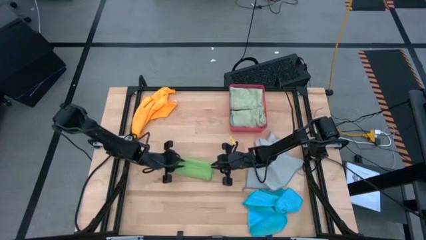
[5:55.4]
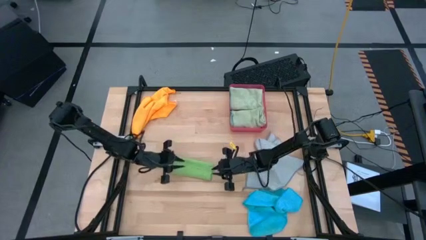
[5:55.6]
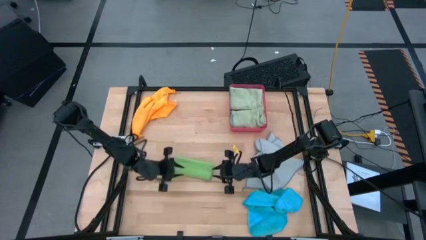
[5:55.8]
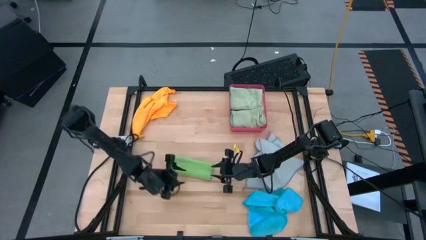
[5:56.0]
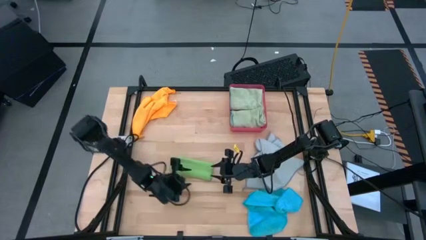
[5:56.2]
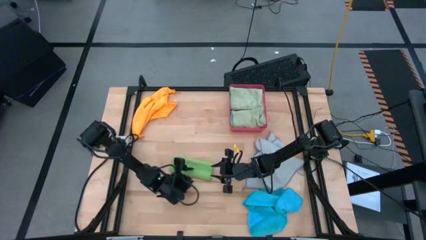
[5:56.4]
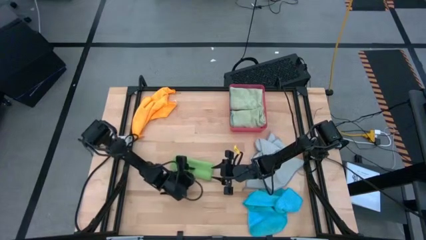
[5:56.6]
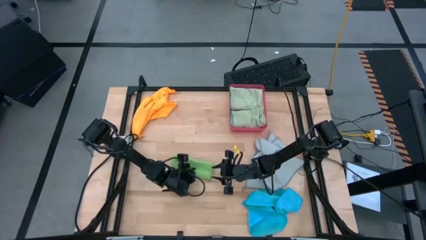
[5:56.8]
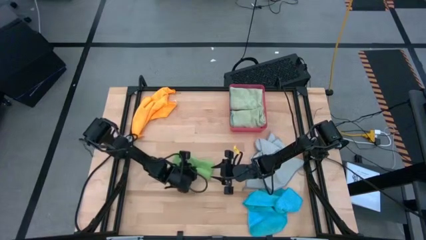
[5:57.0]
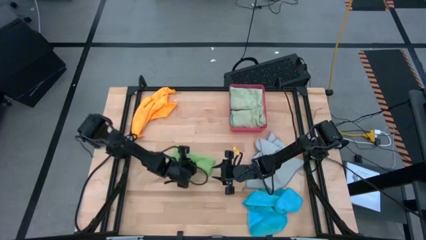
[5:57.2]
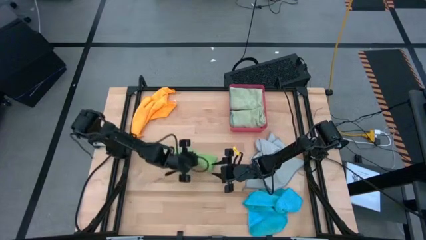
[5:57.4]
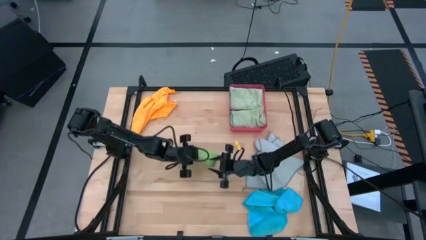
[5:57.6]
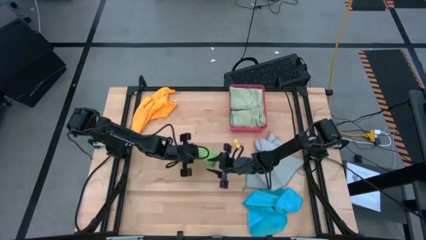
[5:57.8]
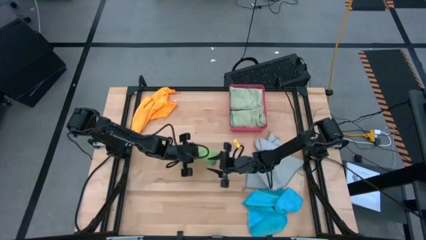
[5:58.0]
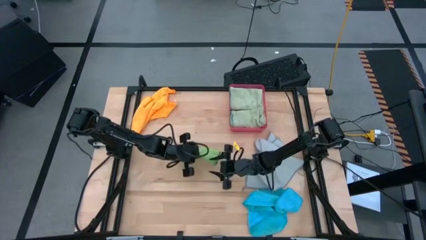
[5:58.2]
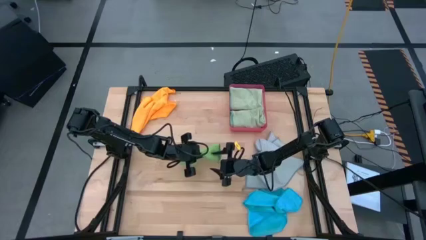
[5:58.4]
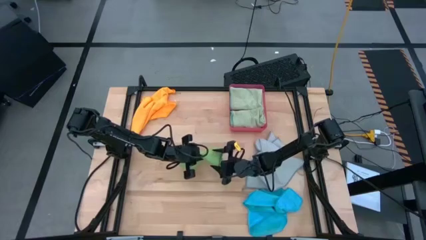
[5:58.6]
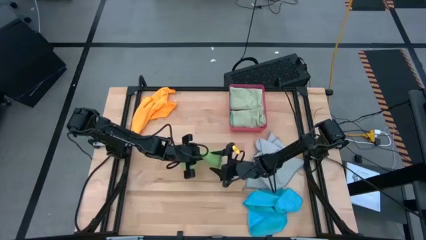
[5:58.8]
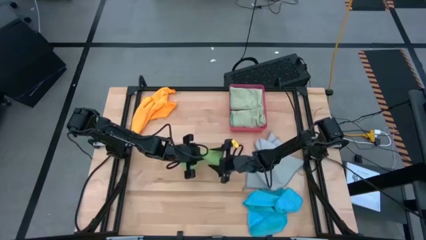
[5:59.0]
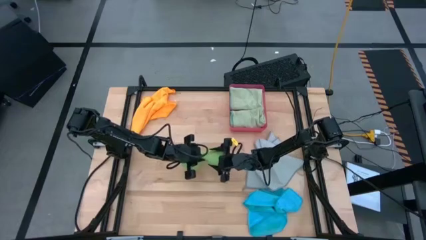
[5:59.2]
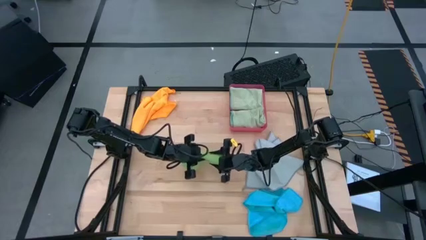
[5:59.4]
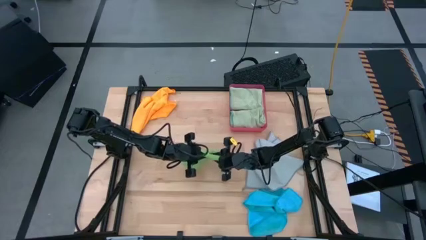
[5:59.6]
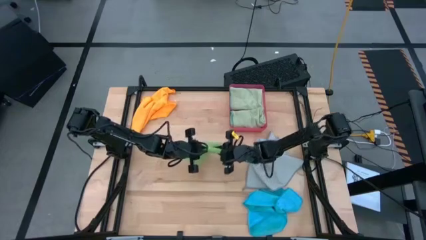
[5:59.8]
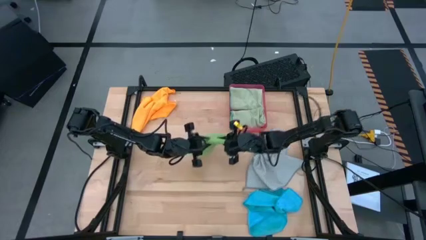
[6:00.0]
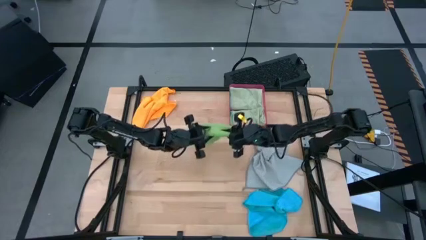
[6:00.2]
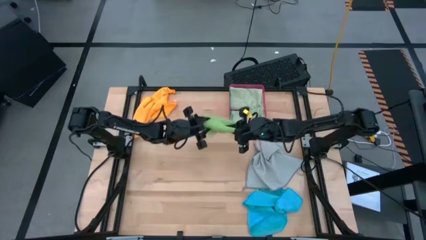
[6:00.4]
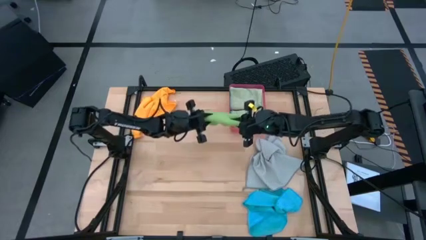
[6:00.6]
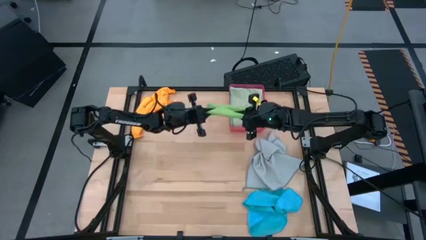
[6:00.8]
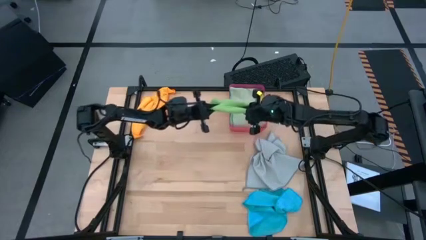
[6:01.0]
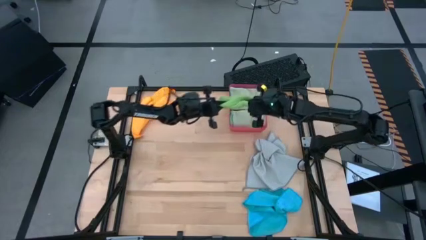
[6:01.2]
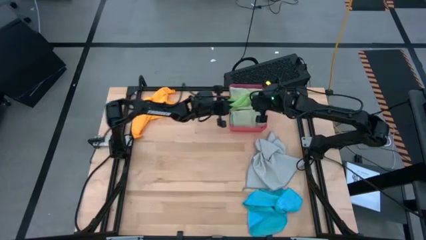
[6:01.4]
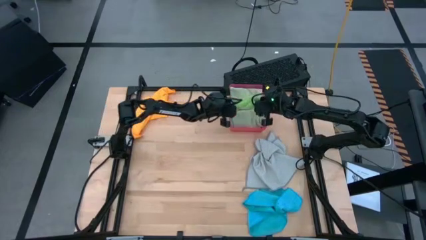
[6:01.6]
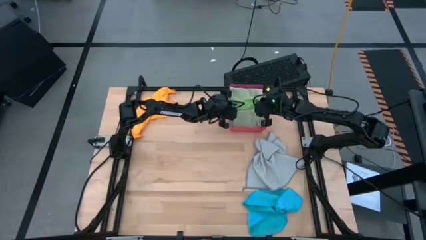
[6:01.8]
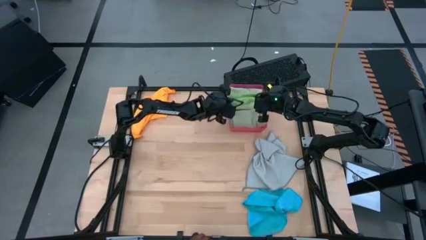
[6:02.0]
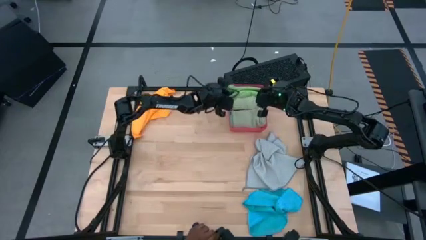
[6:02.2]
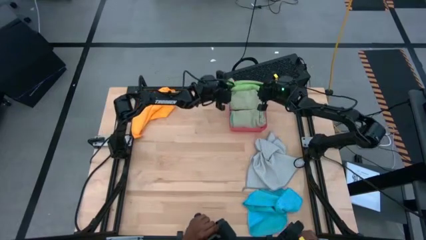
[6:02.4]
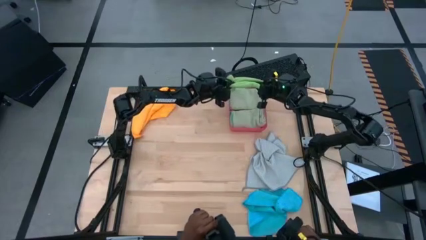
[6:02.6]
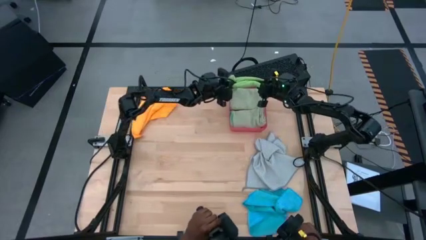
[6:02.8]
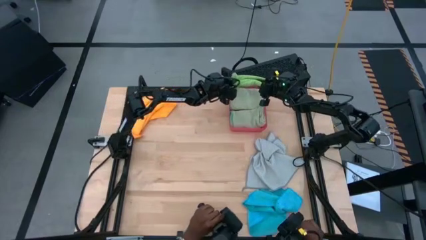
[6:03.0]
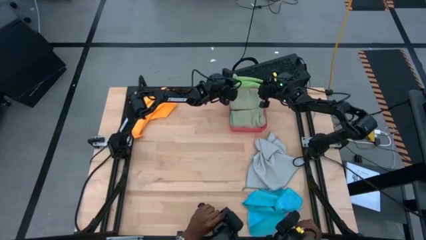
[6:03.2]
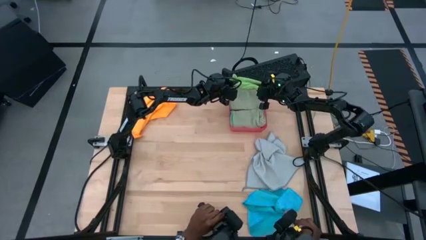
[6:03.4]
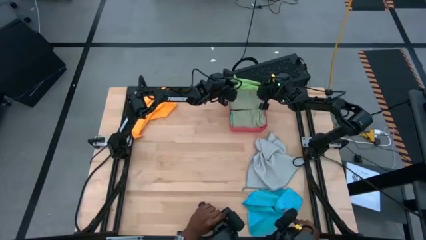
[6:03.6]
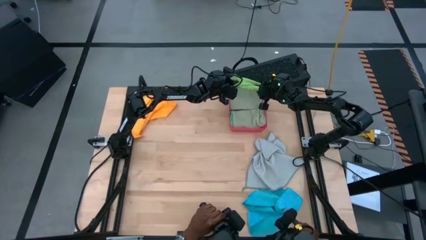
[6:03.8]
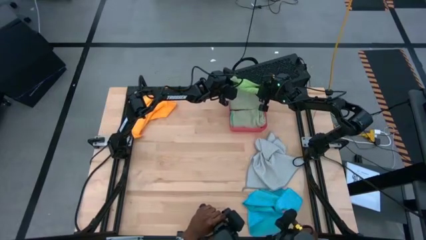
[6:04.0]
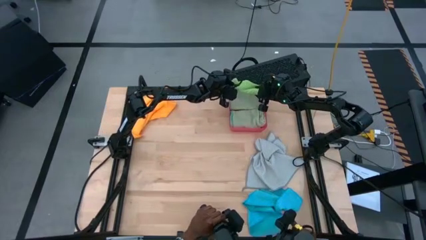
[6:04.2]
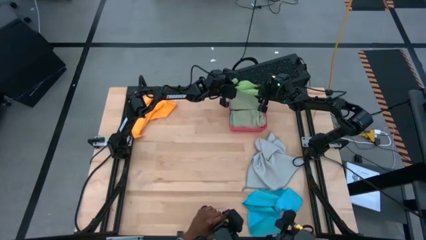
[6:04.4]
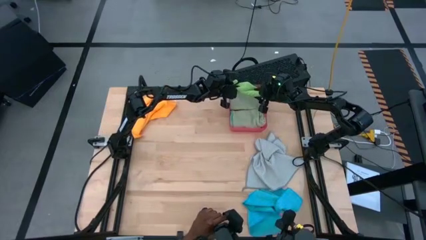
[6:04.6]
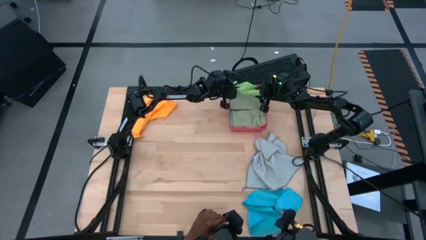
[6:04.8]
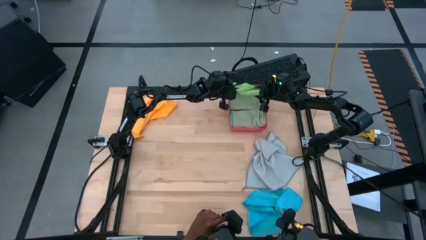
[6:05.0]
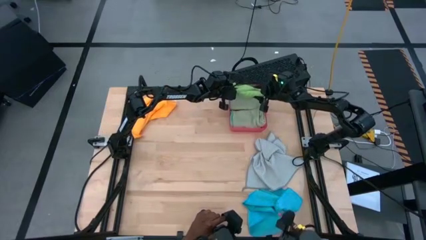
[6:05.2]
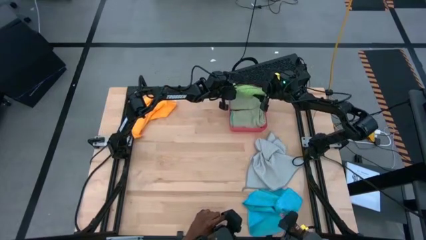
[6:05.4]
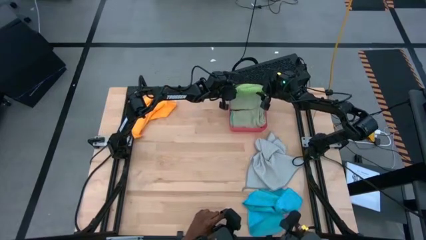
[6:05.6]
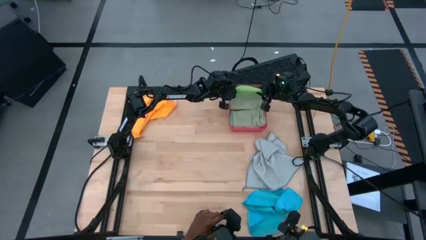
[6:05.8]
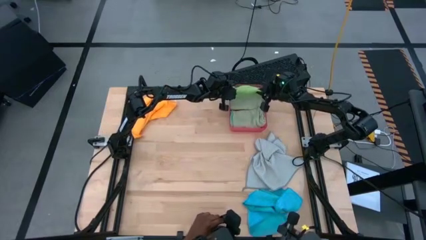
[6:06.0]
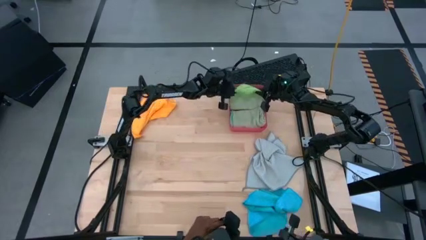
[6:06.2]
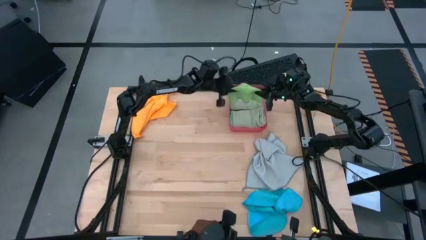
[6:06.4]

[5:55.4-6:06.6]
Task: Fold microfiber towels
Stack the dark green microfiber cloth on the top light green microfiber cloth in the red bin

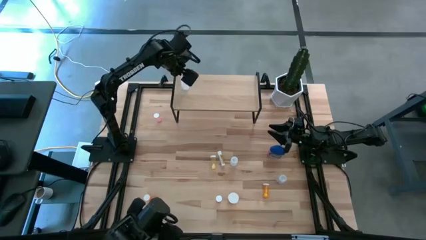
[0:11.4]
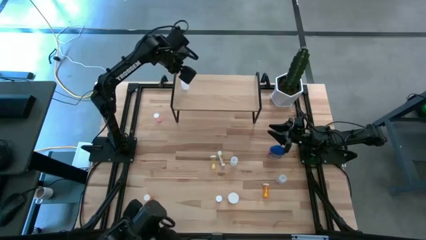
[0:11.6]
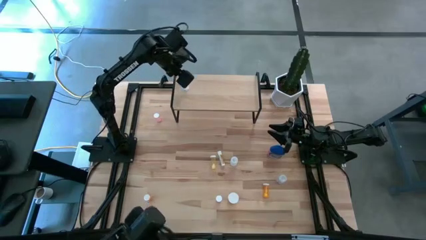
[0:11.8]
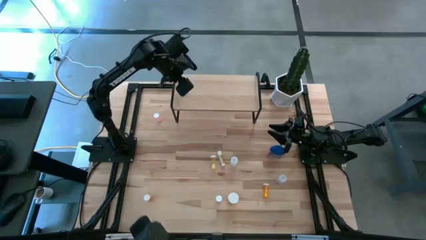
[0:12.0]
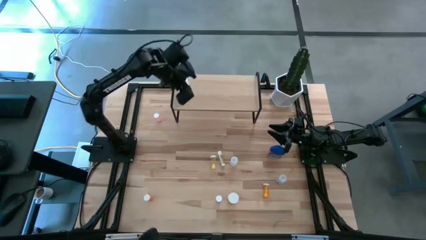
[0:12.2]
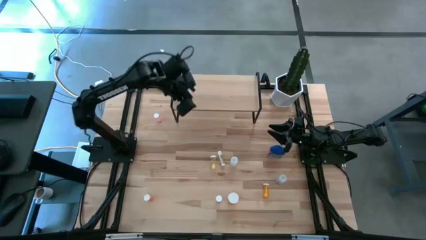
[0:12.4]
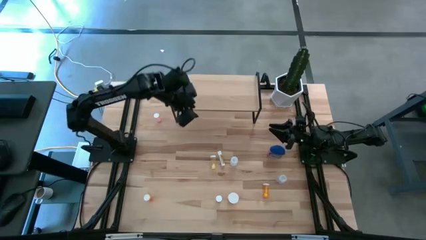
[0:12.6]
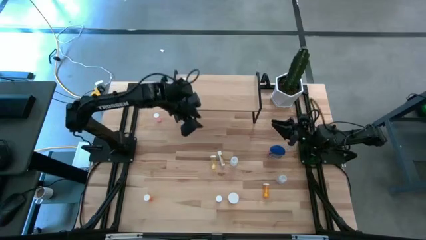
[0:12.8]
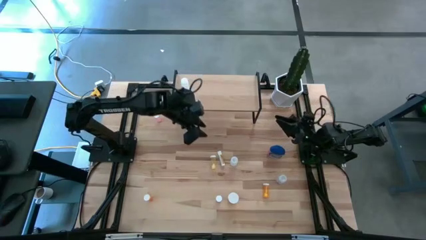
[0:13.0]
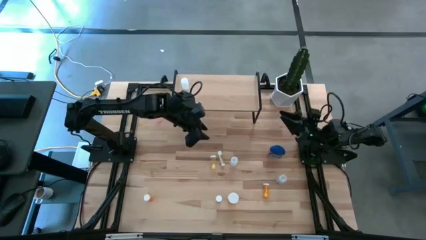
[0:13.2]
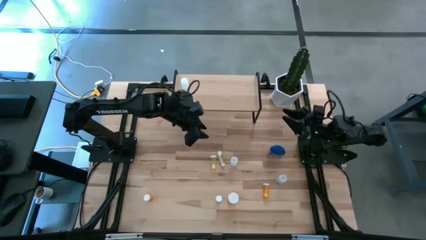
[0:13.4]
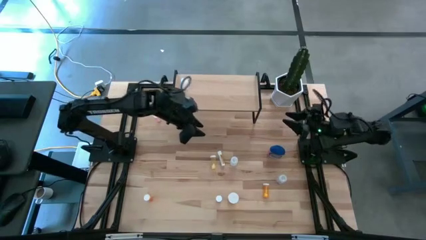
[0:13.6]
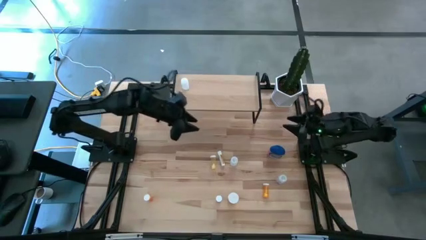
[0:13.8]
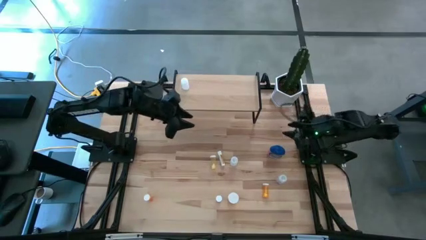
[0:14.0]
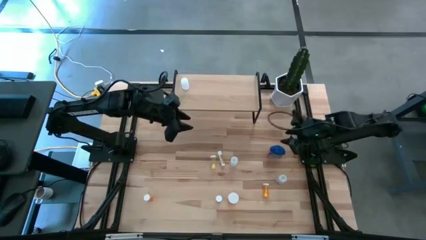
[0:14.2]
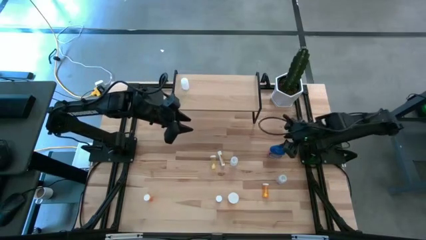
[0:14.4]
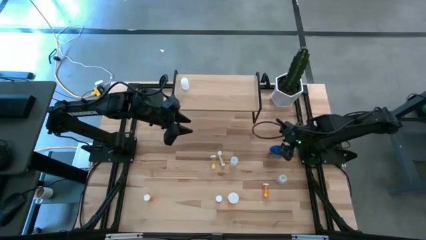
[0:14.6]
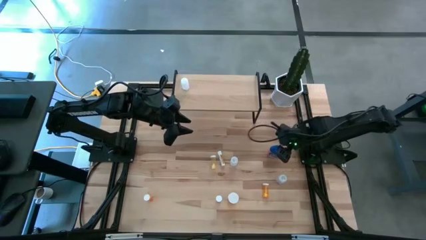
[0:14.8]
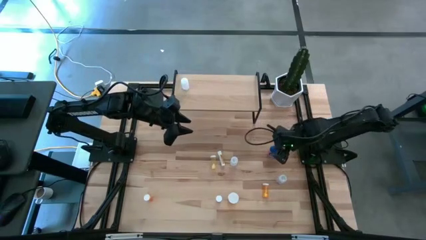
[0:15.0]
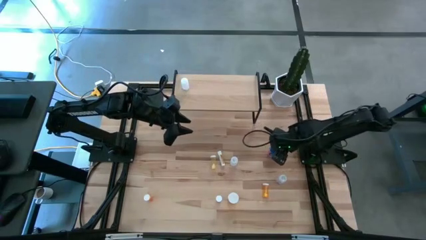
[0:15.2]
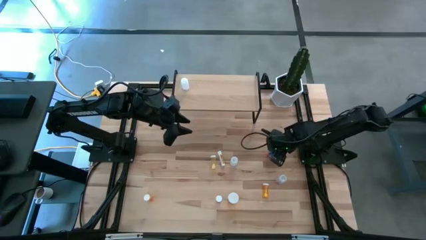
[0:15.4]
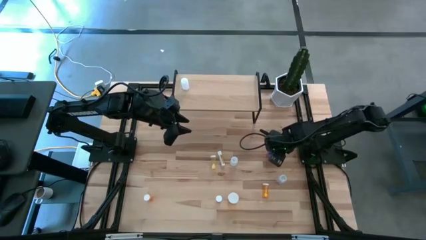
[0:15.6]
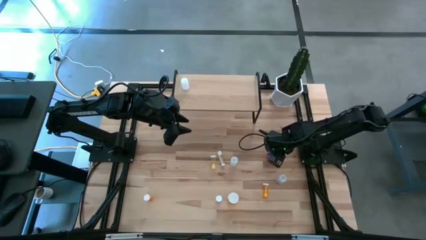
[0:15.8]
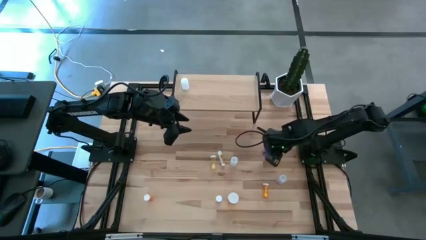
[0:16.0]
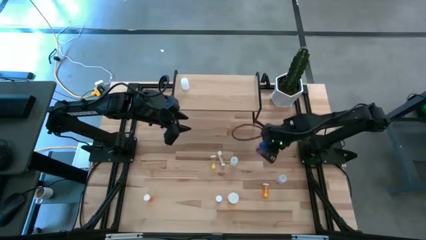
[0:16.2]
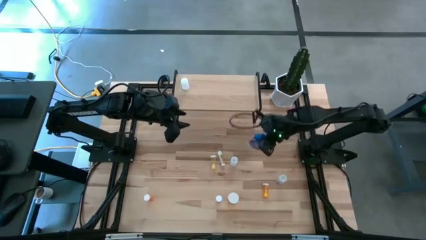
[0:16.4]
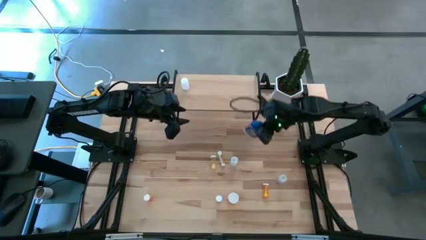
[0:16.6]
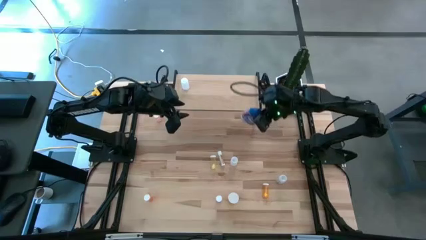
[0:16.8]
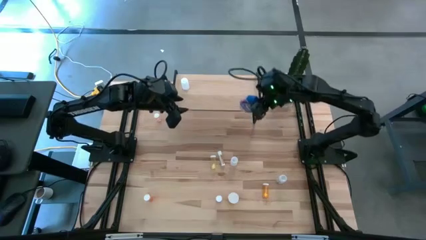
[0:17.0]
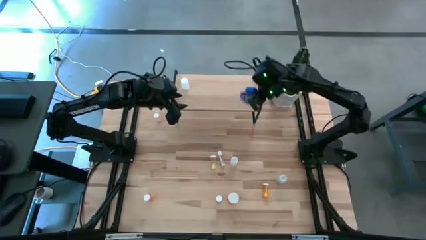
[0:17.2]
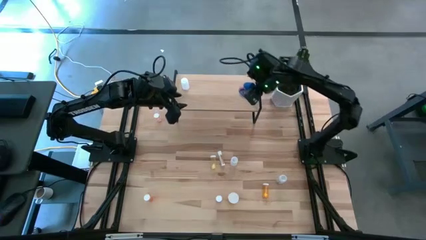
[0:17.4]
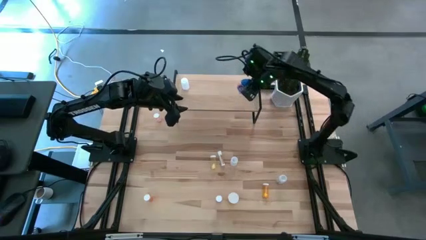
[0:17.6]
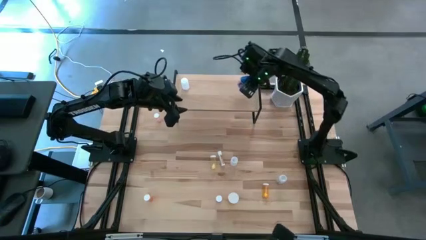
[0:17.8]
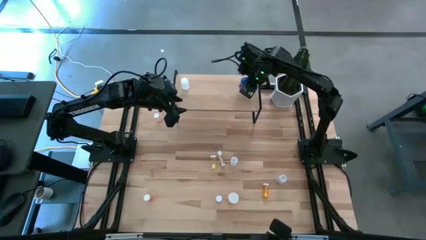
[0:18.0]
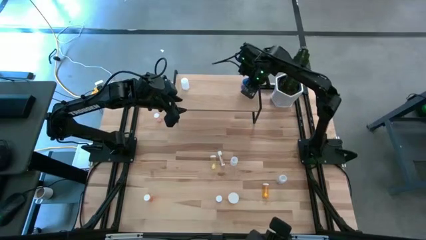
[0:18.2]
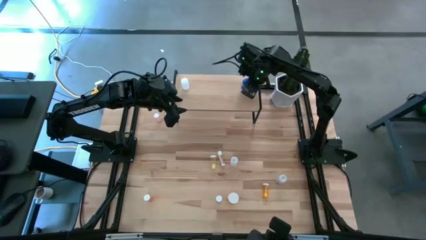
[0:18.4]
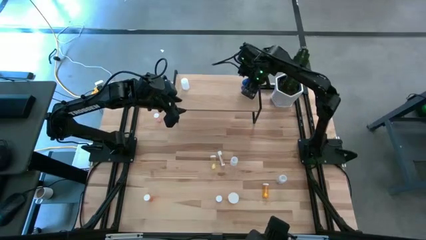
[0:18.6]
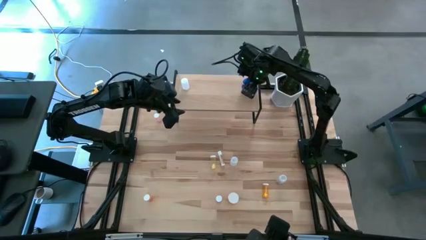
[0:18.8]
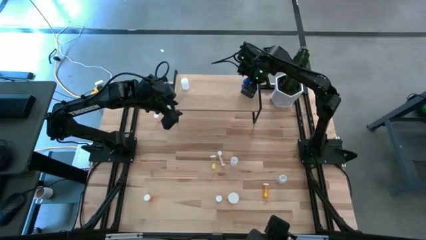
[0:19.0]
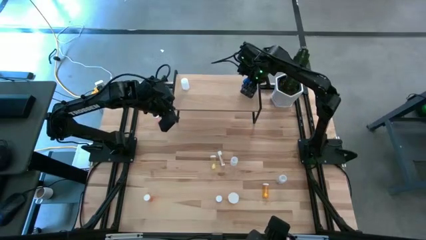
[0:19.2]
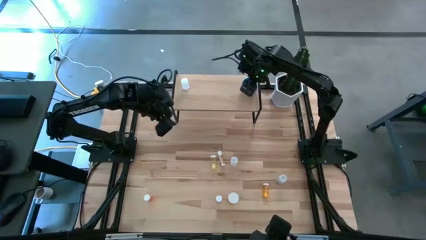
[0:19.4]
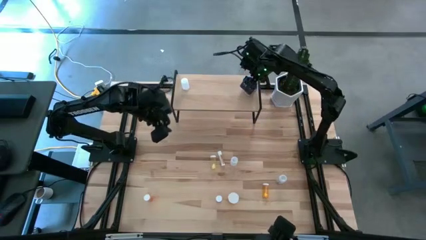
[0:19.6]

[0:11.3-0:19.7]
Task: Pick and place medicine bottles onto shelf by color
Put the blue bottle on the shelf
